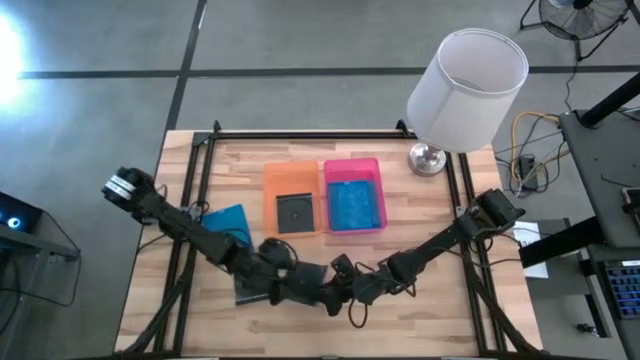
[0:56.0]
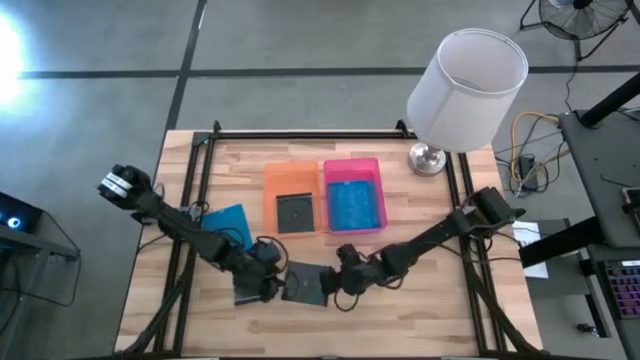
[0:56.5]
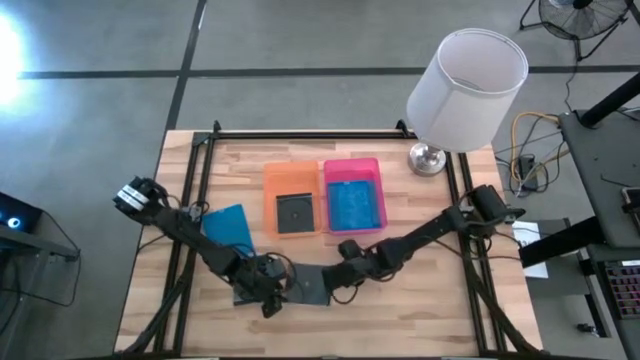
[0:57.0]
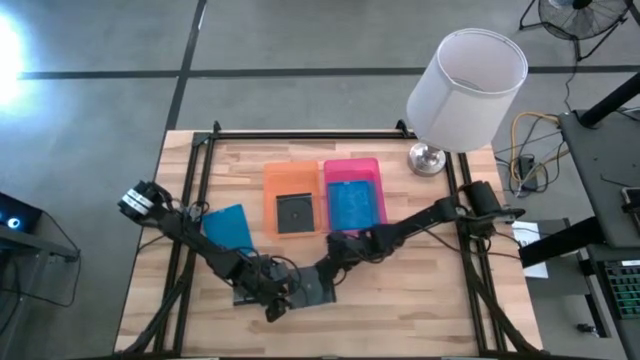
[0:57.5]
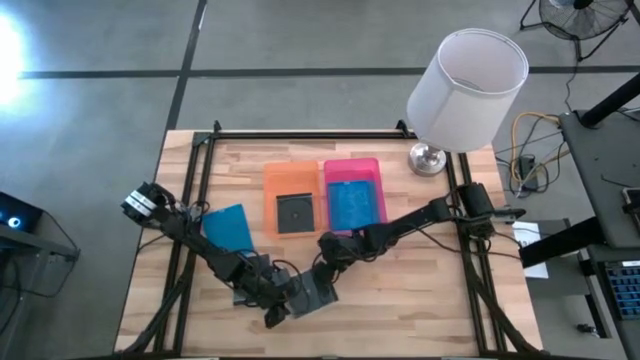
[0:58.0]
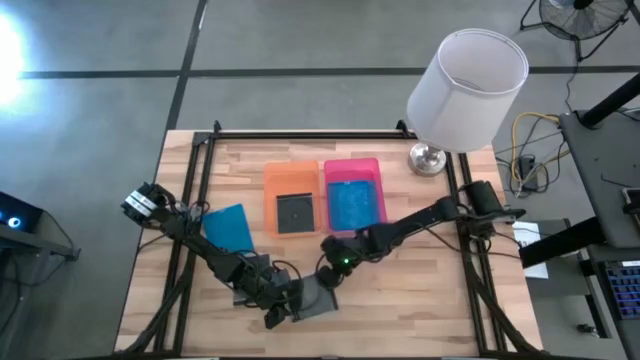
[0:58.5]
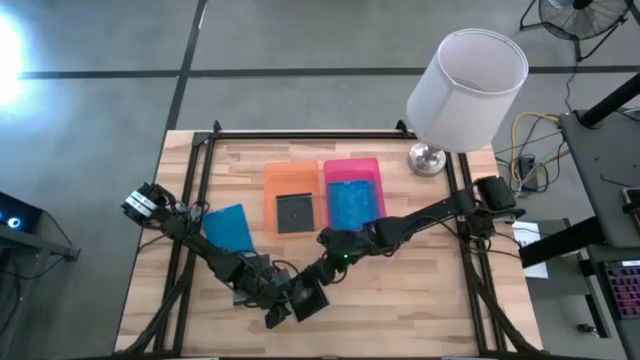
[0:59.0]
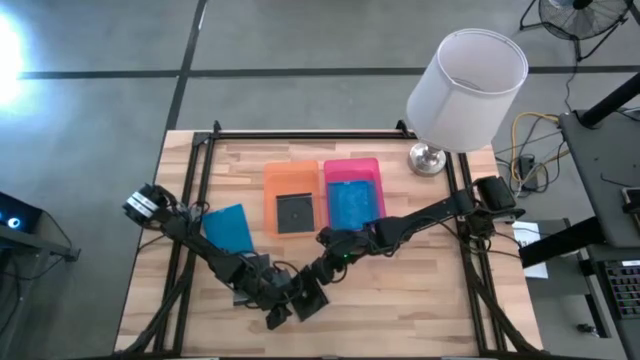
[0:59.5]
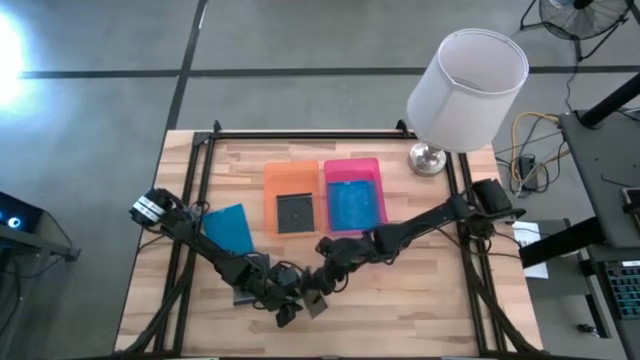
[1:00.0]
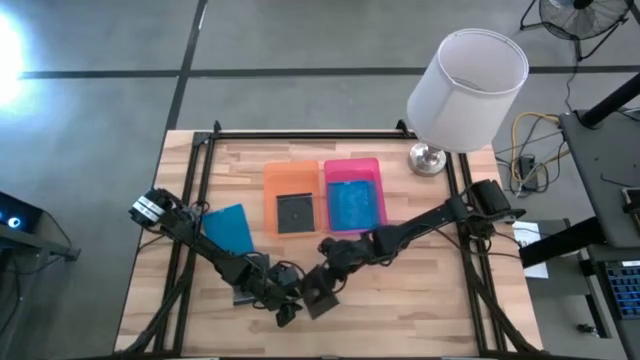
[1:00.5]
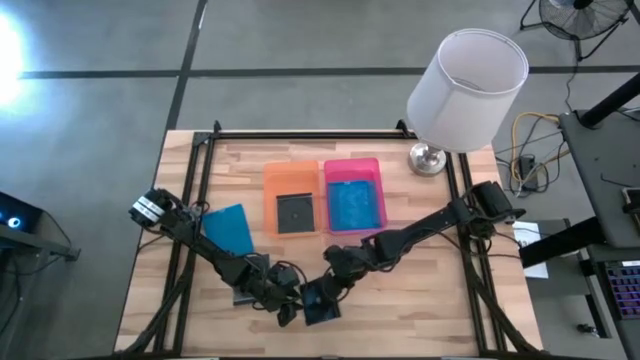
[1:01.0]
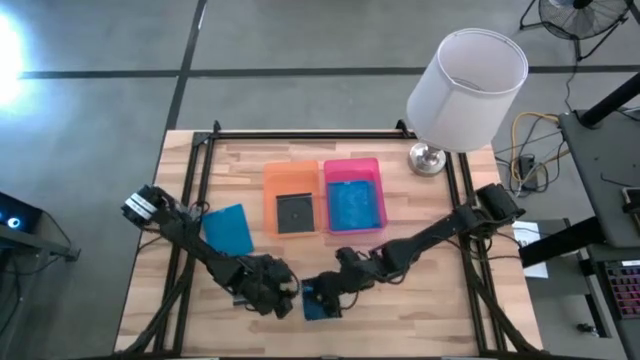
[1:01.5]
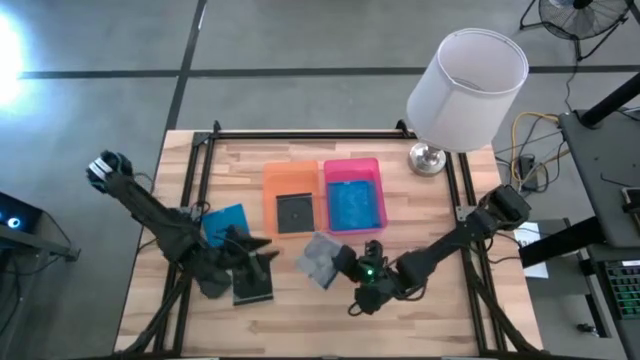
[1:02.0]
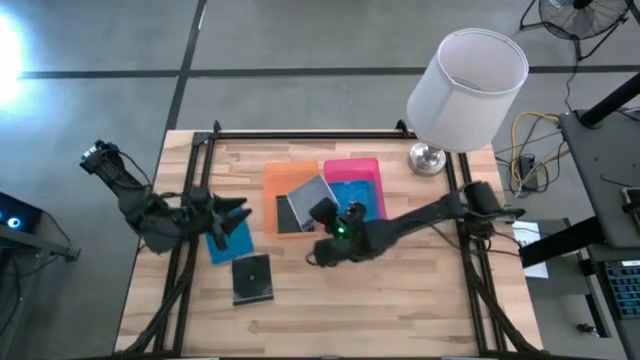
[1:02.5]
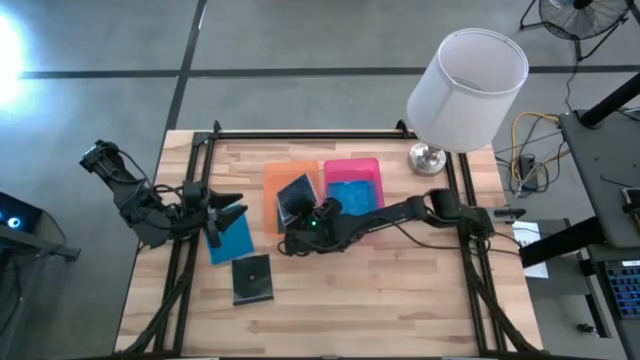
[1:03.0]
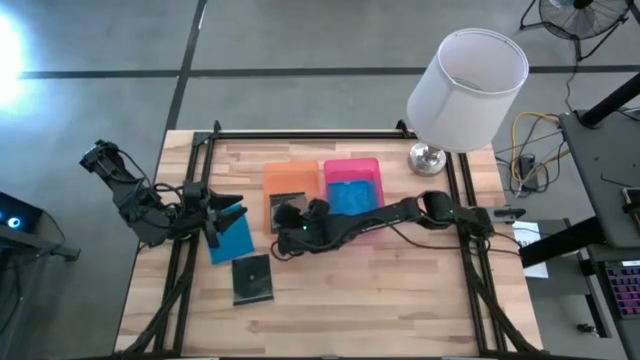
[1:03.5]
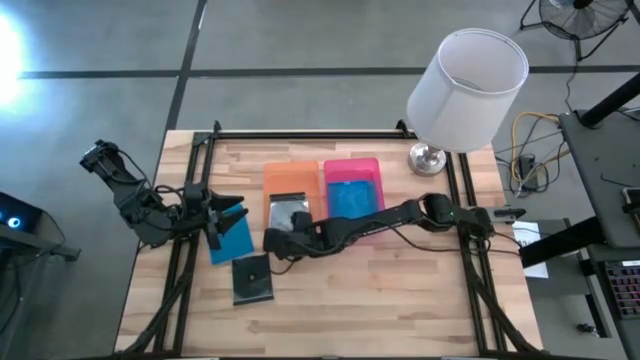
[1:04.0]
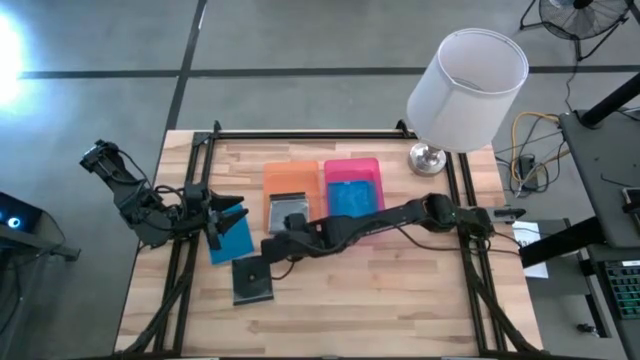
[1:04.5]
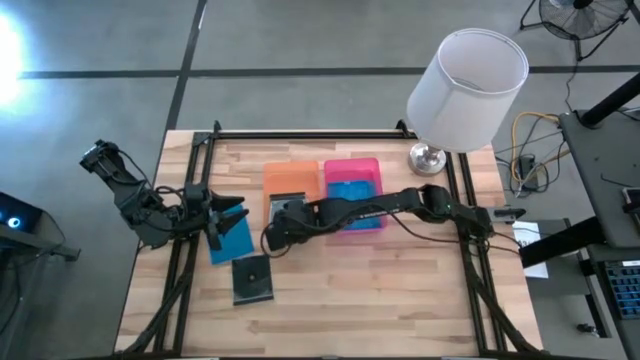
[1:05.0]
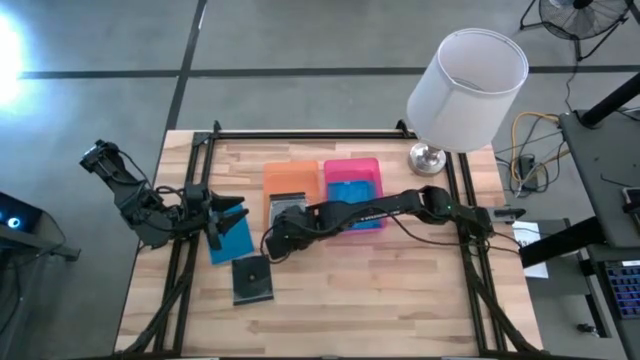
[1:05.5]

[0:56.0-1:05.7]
Task: Pick & place jewel cases by type
Put the bottom black cd case into the orange bin

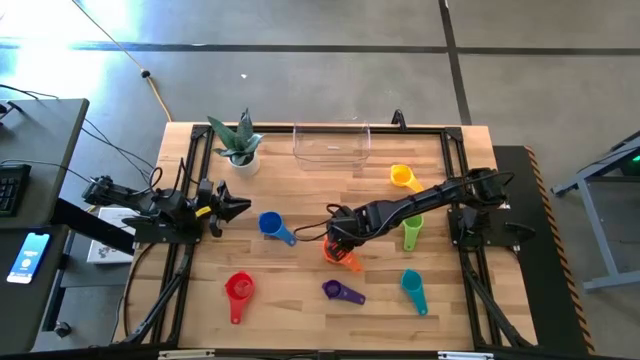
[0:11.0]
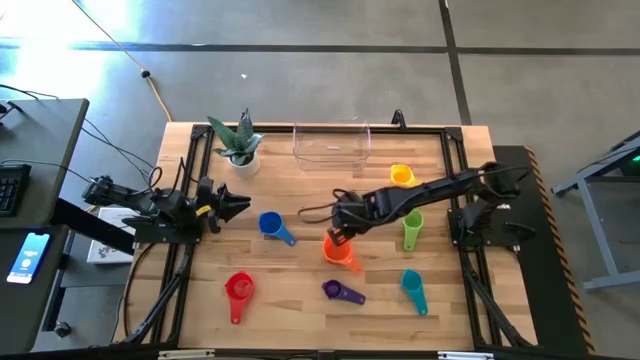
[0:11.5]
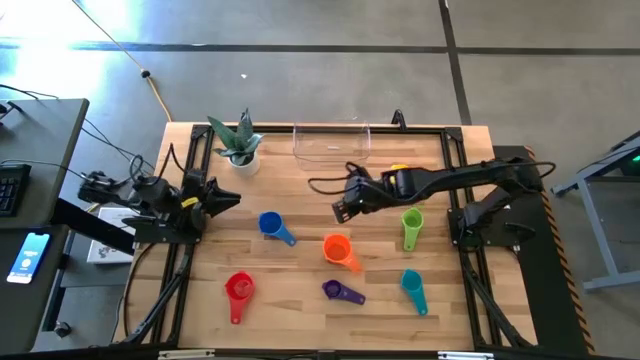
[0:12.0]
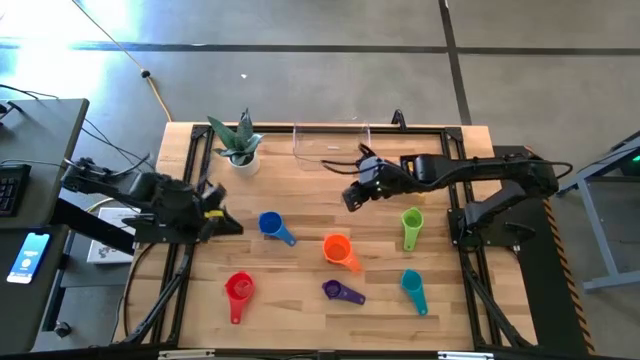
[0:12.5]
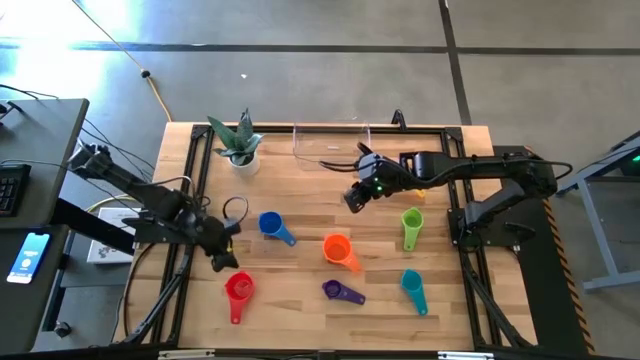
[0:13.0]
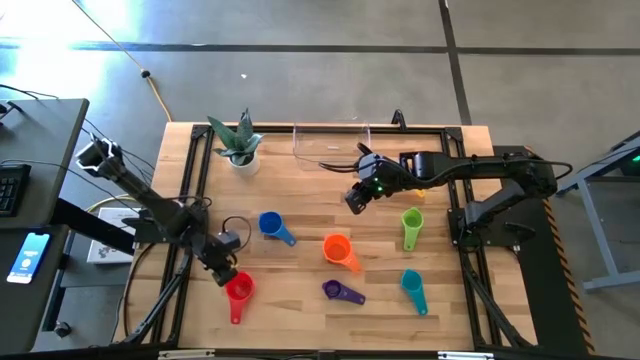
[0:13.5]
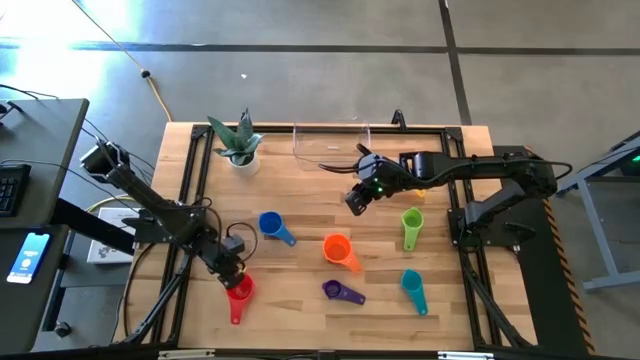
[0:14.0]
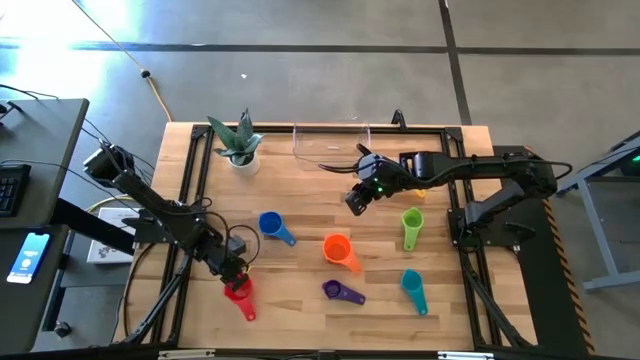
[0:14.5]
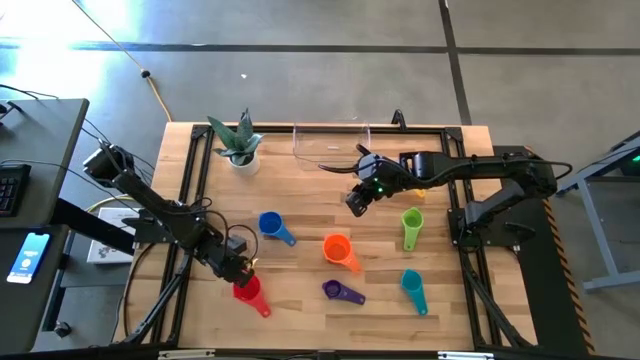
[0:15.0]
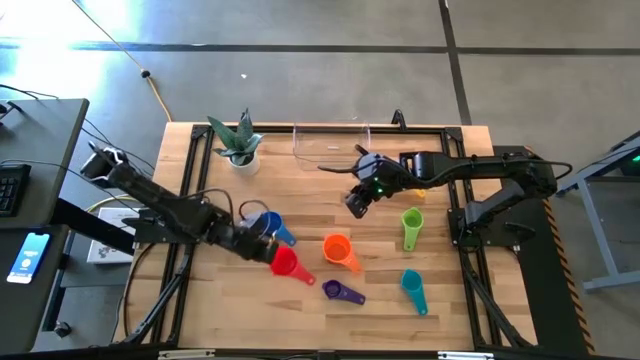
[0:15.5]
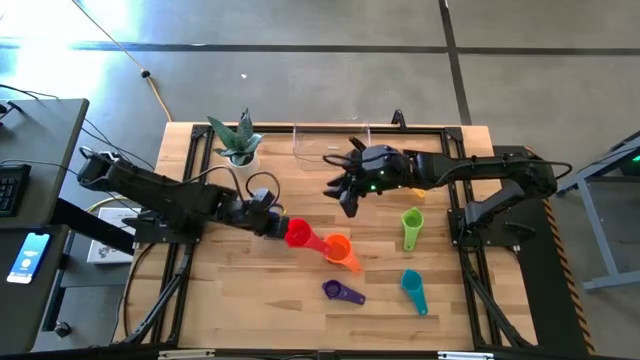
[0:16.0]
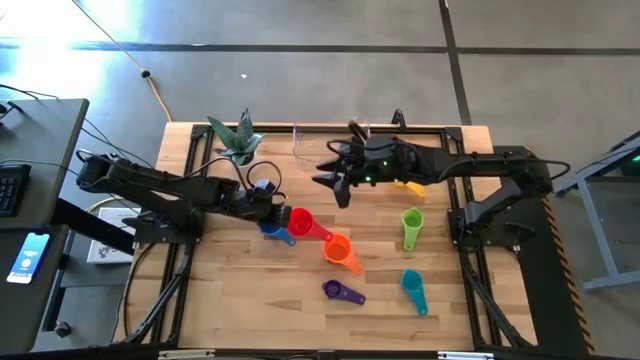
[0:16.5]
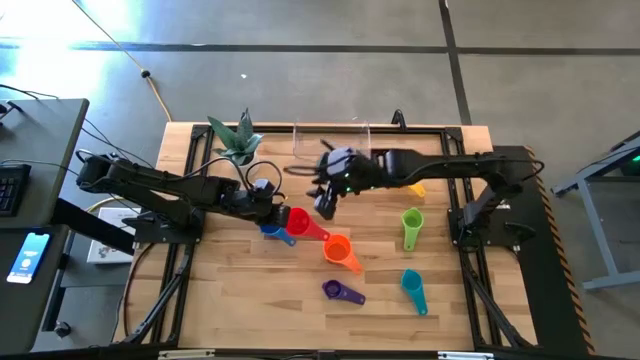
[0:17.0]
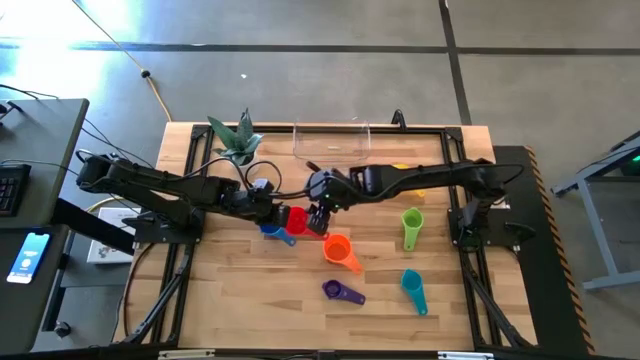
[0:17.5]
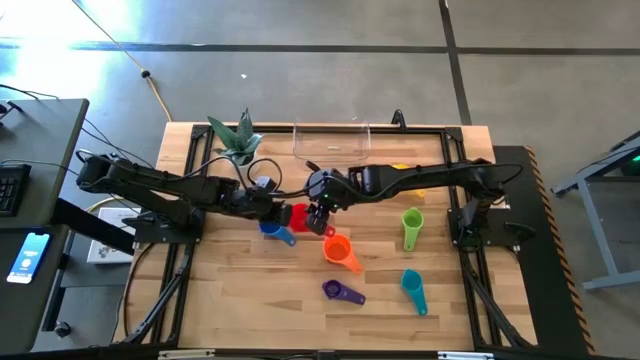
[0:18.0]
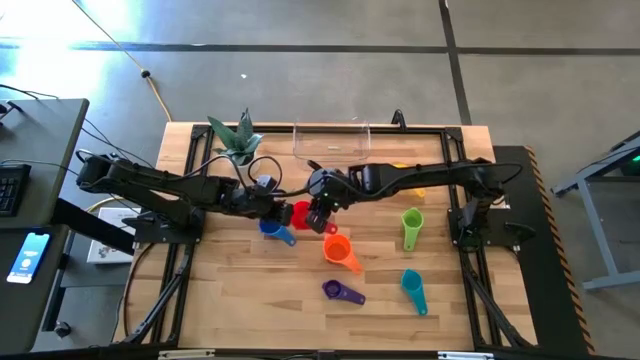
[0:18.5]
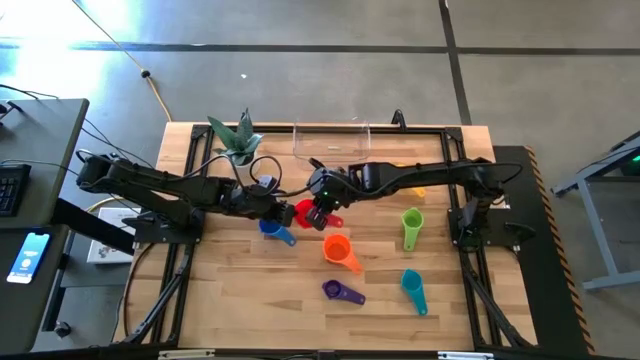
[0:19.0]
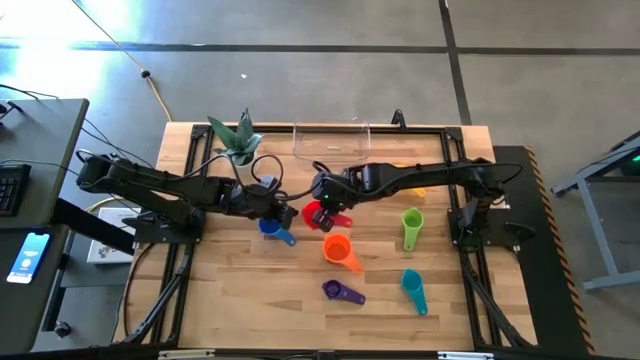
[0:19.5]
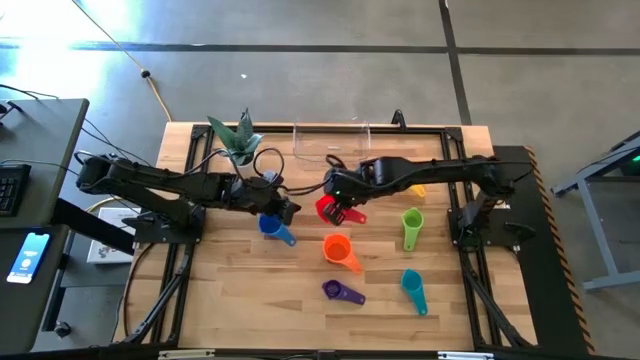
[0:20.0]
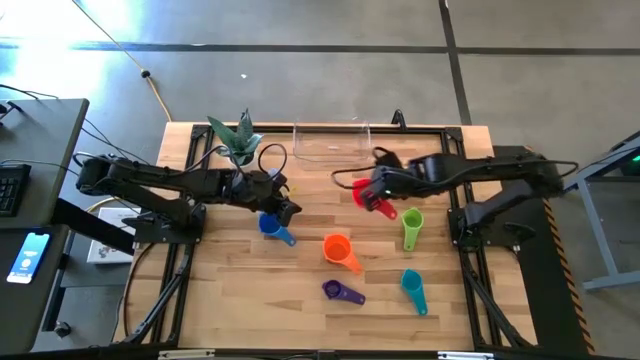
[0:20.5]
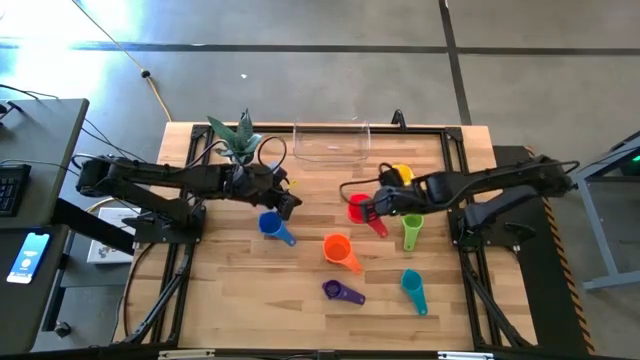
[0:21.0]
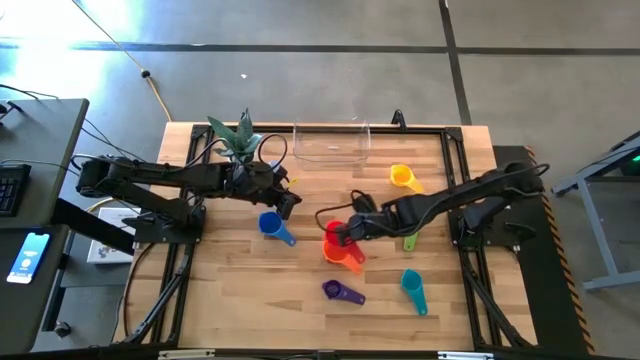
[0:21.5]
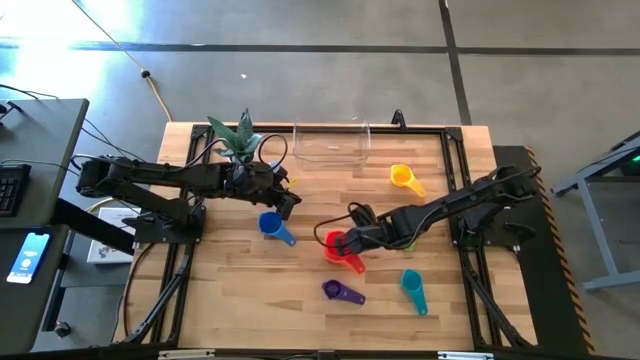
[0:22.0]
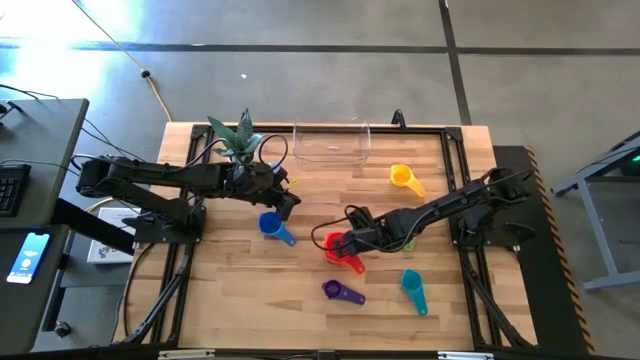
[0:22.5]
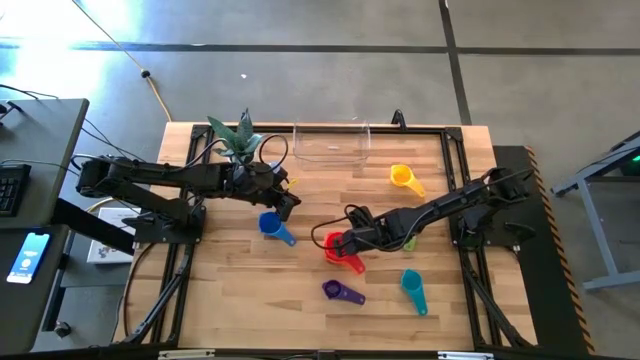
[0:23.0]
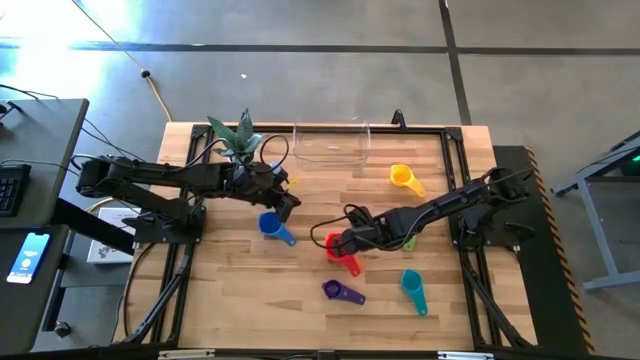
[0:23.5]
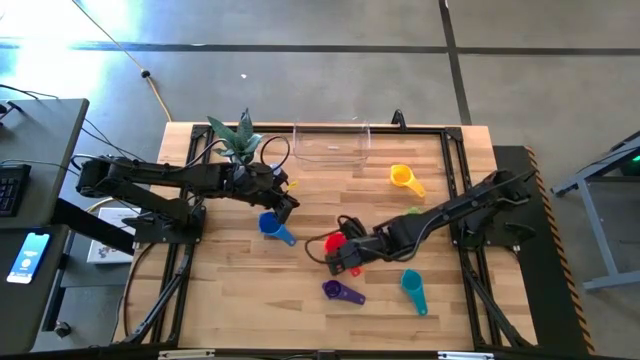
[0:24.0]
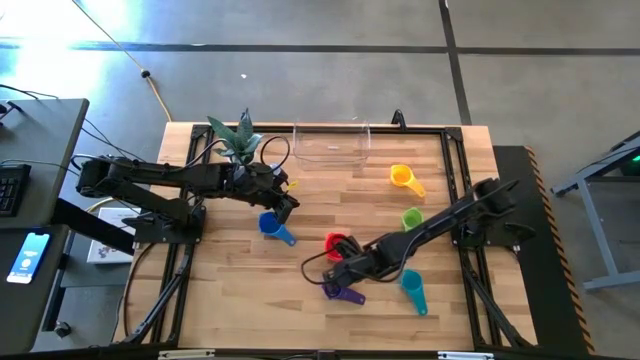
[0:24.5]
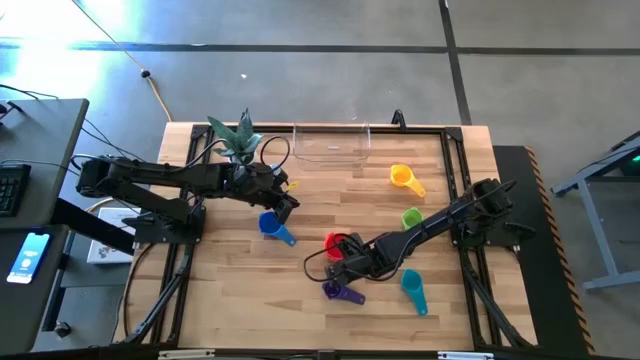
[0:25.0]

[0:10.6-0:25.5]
Task: Nest measuring cups in basket
Stack the red measuring cup on top of the orange measuring cup
